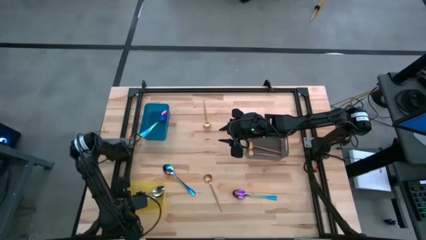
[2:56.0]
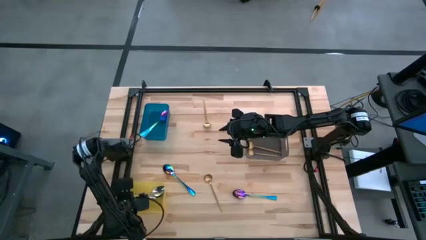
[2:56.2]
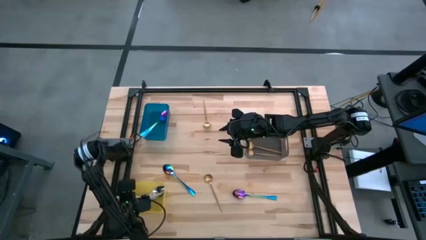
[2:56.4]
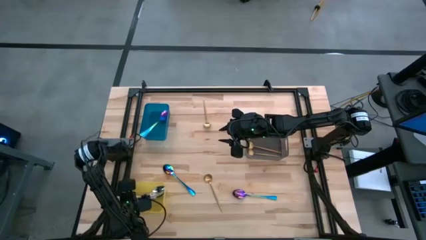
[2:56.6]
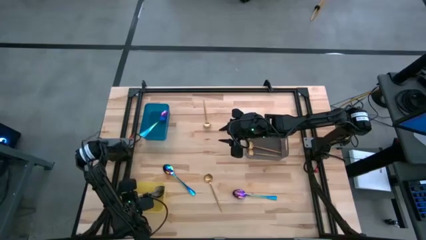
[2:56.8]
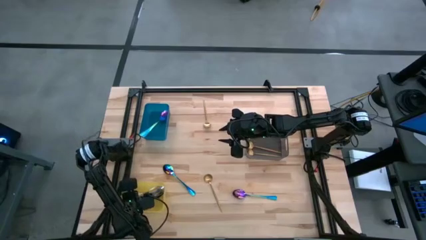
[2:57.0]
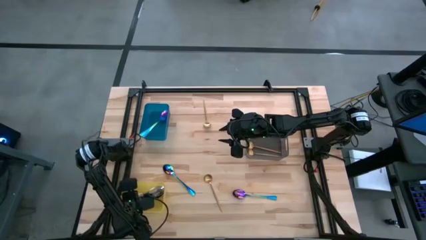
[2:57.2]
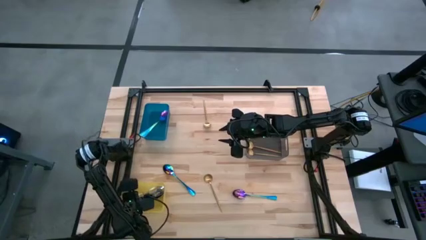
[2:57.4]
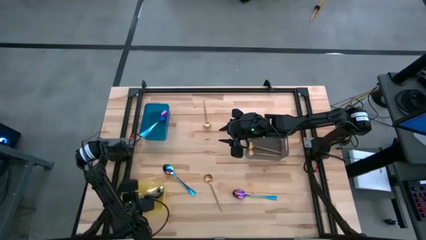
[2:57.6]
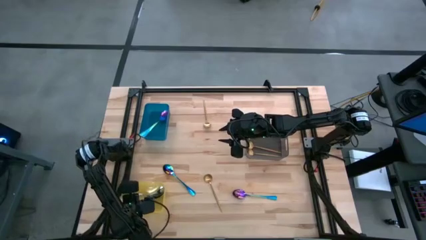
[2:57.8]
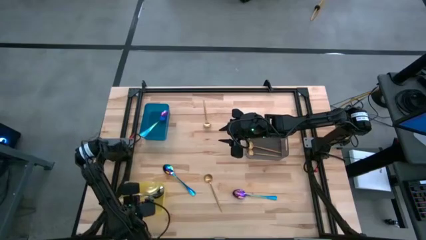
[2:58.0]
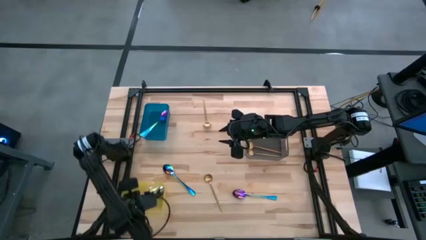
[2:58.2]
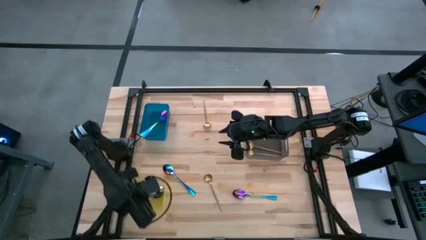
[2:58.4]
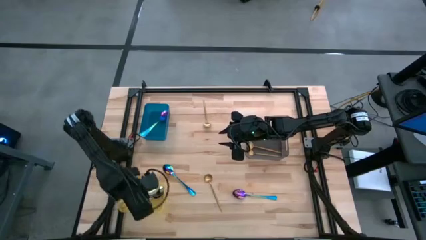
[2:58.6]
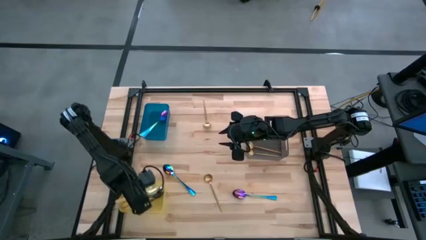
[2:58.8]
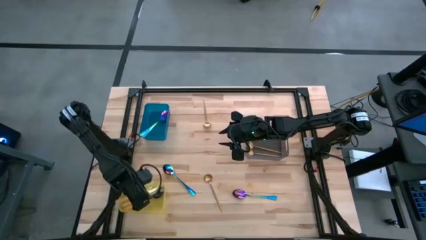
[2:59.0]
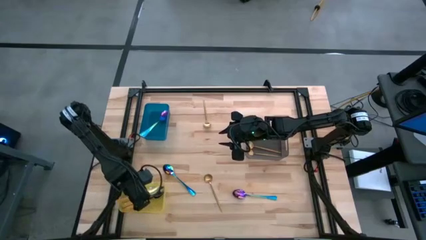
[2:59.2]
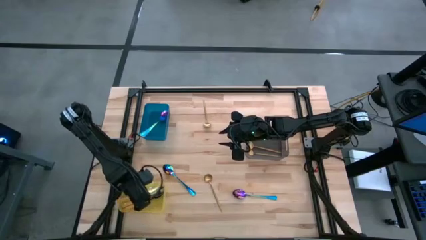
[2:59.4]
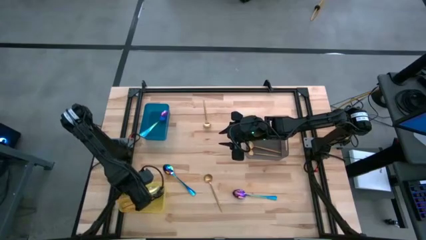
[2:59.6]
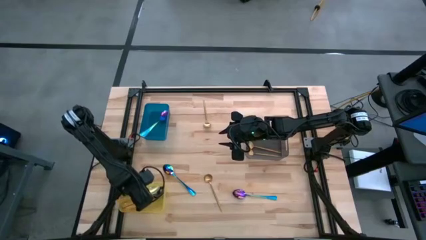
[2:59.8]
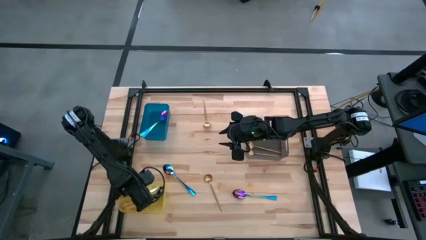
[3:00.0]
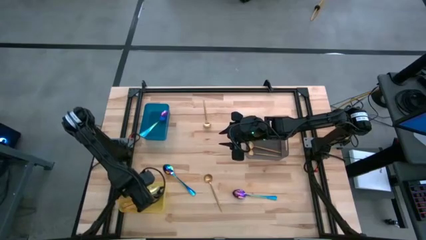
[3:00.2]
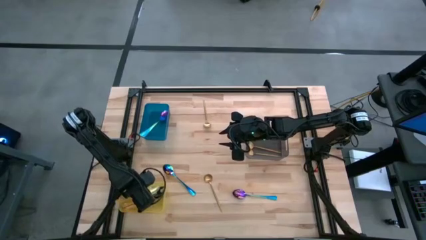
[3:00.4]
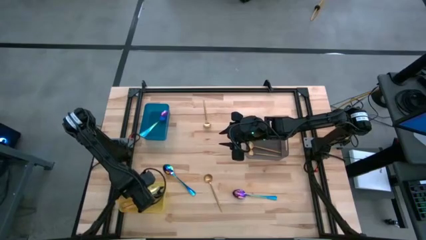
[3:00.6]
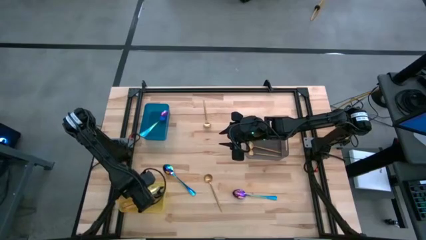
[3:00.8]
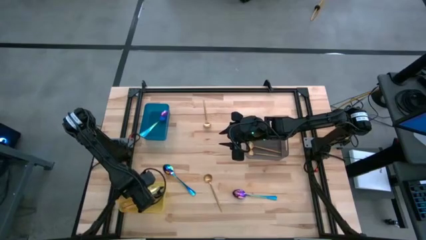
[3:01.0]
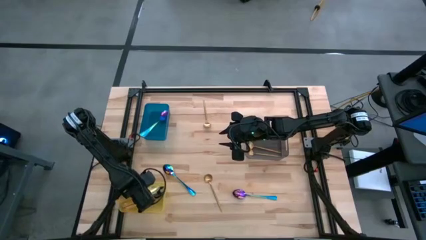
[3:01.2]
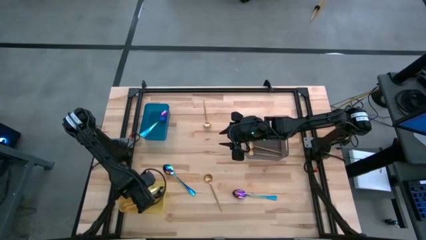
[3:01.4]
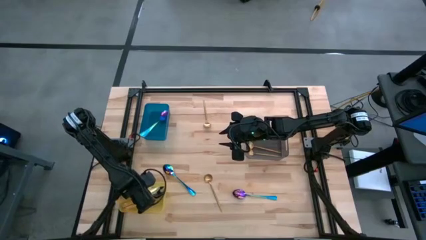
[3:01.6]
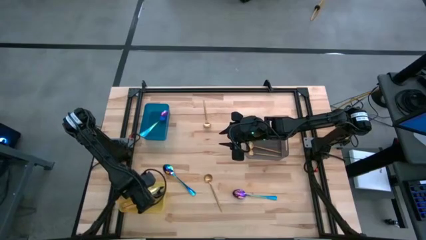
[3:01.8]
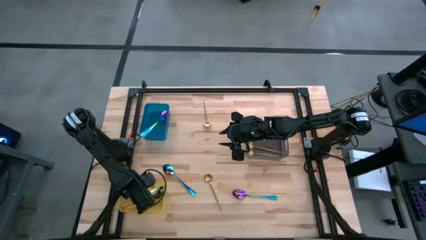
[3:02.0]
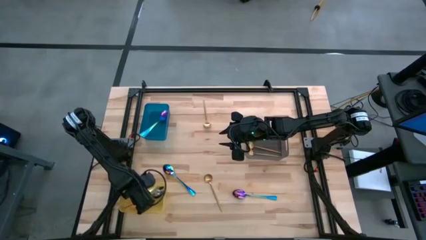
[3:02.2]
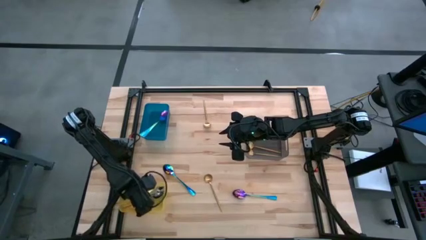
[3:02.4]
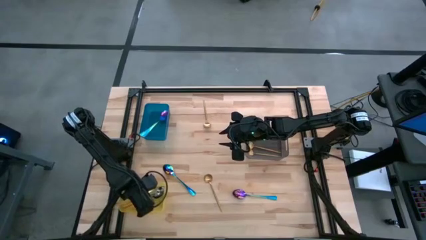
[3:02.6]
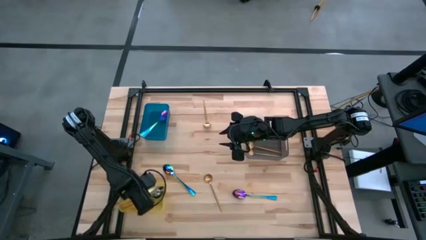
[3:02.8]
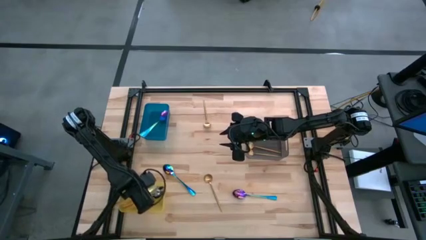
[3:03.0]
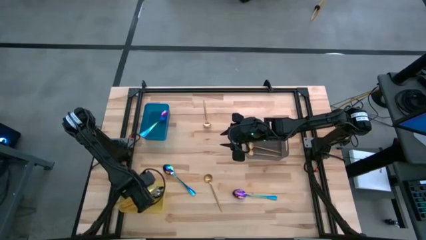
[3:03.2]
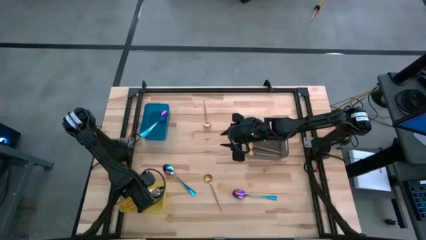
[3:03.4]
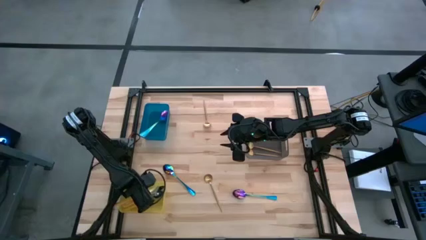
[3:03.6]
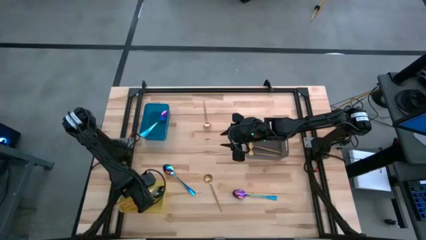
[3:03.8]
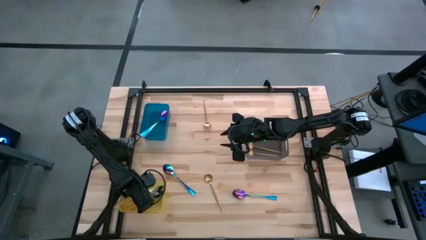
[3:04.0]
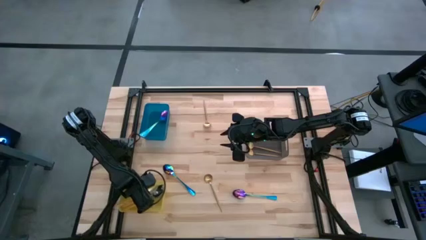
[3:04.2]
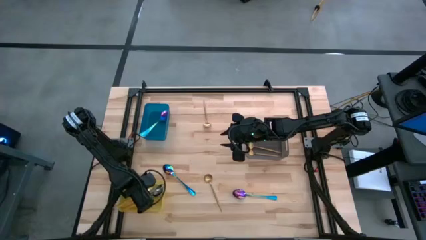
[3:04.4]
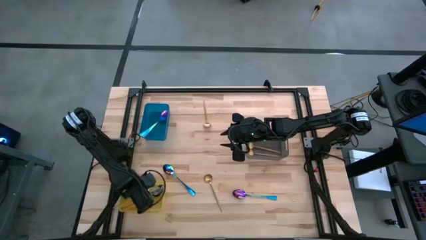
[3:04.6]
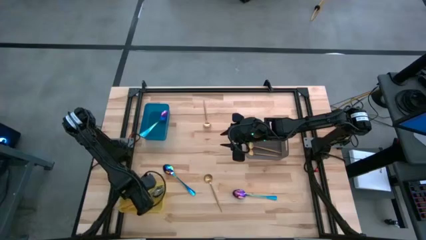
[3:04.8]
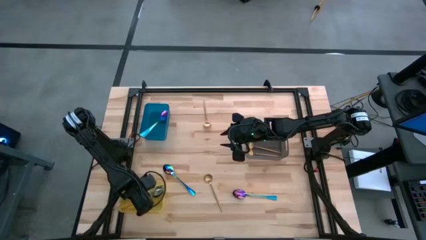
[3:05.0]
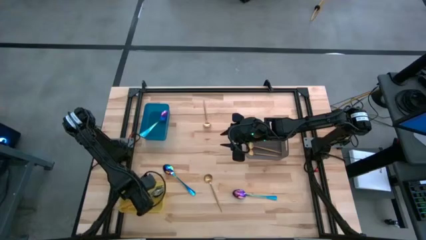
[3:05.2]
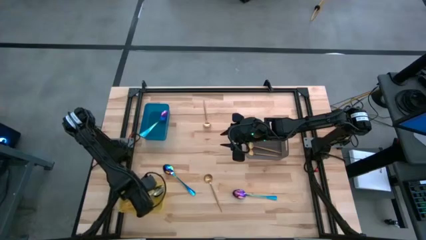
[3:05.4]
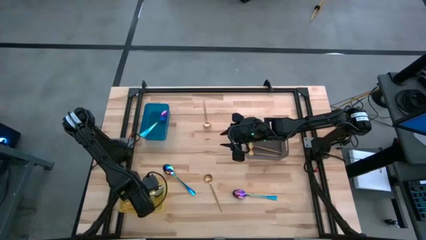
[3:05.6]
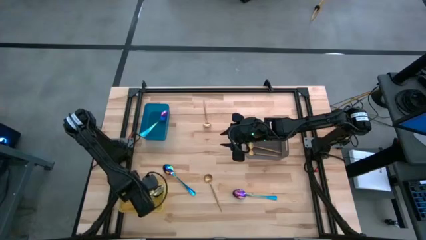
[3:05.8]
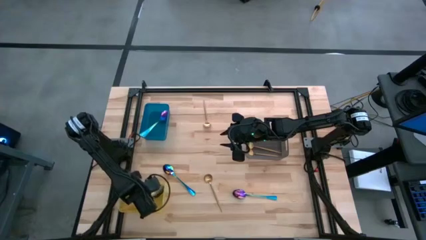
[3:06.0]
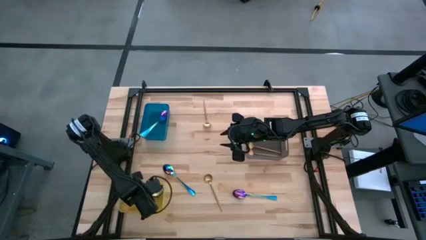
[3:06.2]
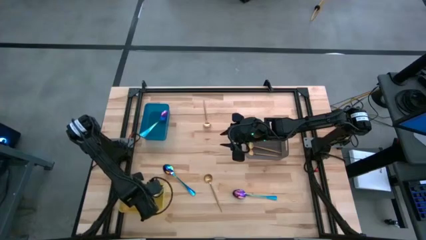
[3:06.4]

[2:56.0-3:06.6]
Task: Sort silverware by color (type)
Put the yellow spoon into the yellow bin

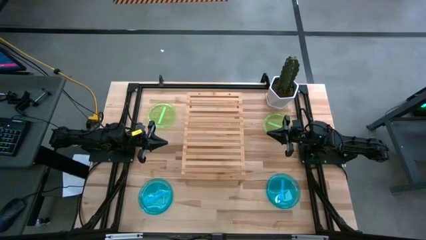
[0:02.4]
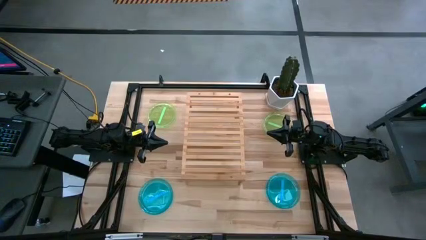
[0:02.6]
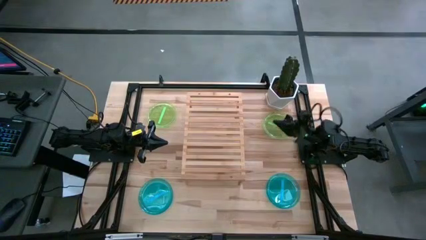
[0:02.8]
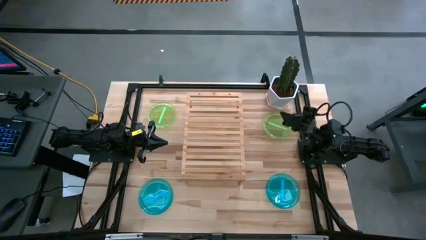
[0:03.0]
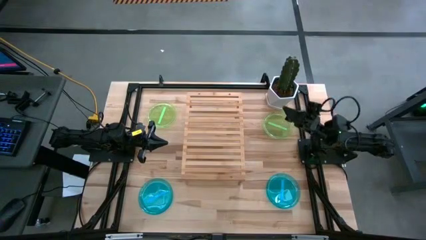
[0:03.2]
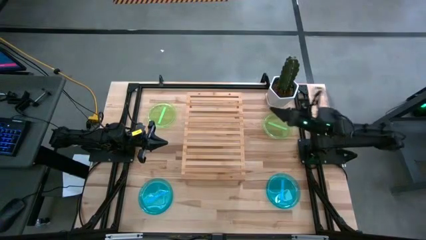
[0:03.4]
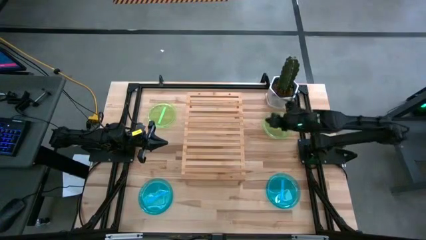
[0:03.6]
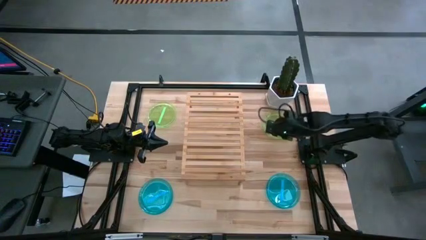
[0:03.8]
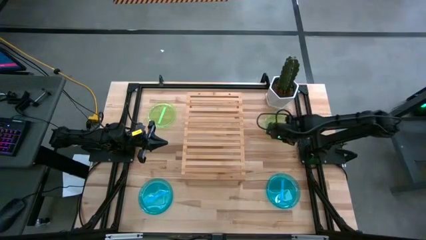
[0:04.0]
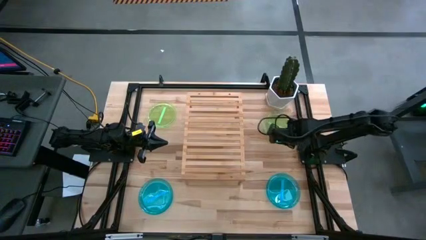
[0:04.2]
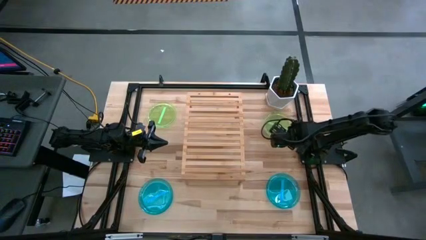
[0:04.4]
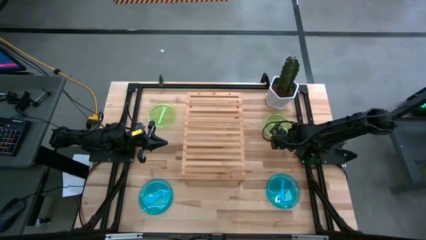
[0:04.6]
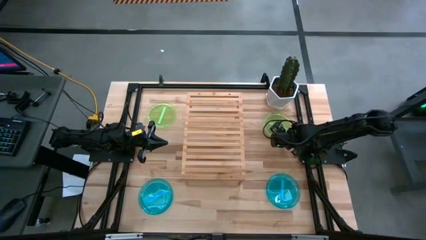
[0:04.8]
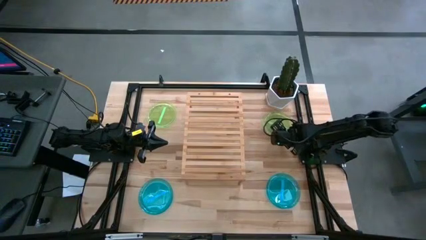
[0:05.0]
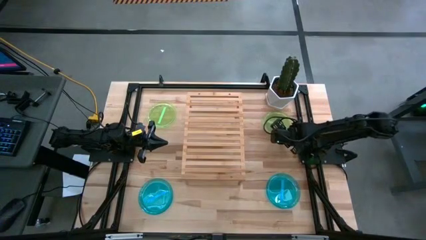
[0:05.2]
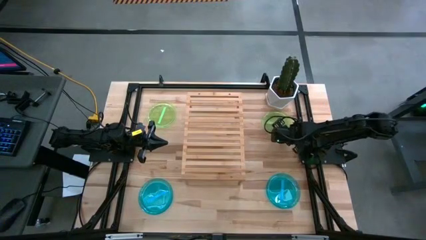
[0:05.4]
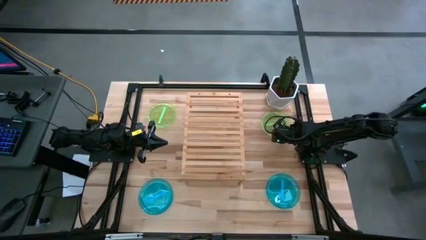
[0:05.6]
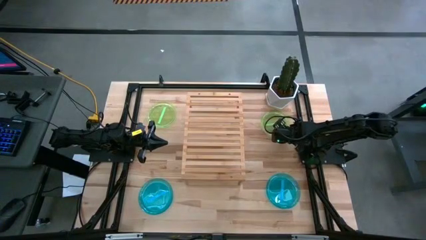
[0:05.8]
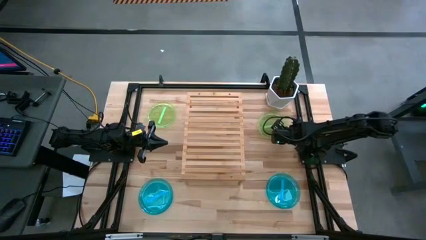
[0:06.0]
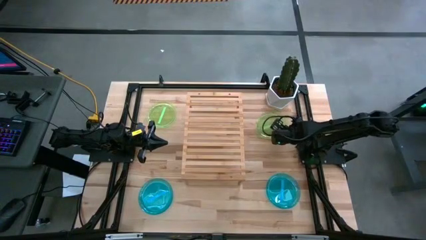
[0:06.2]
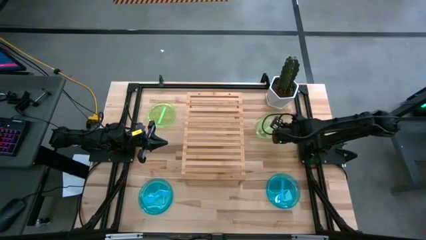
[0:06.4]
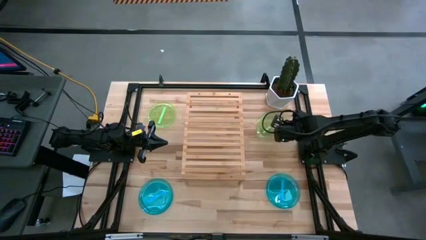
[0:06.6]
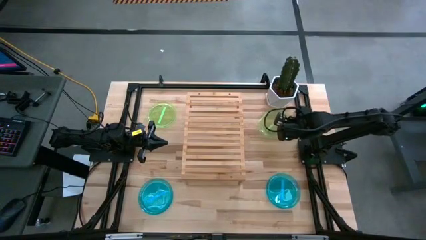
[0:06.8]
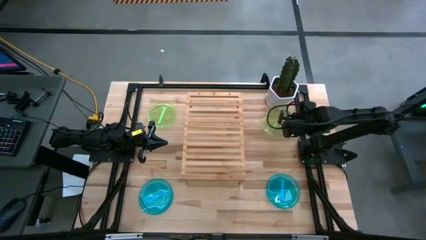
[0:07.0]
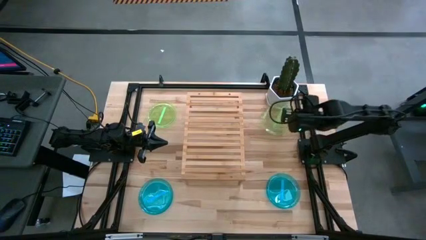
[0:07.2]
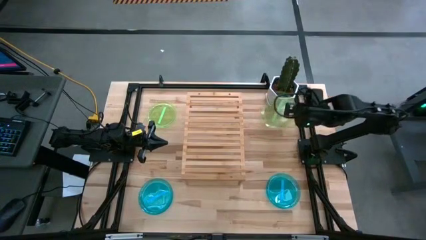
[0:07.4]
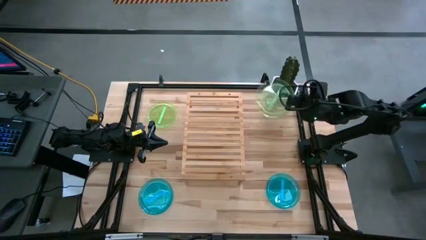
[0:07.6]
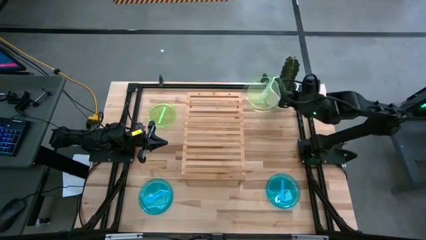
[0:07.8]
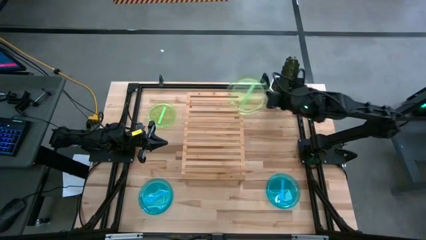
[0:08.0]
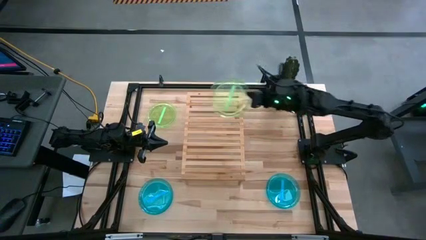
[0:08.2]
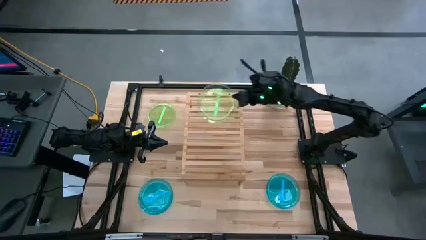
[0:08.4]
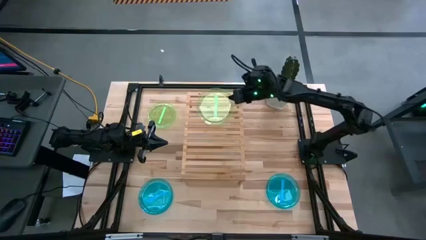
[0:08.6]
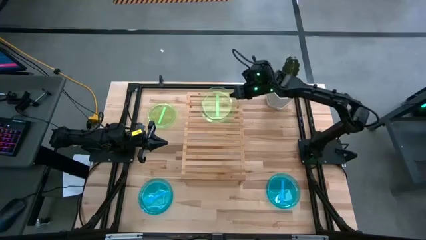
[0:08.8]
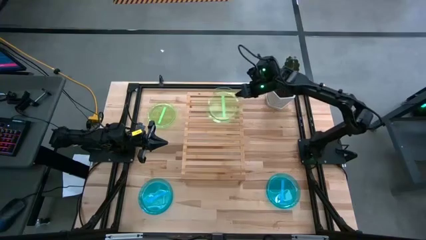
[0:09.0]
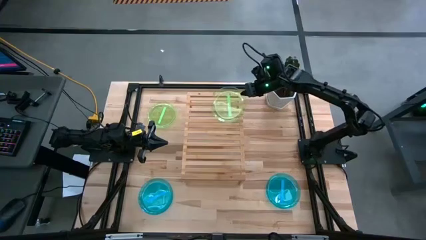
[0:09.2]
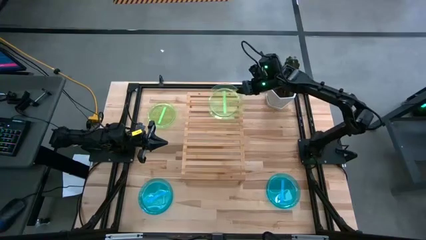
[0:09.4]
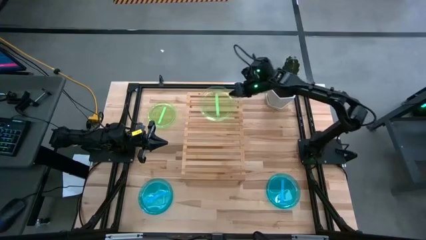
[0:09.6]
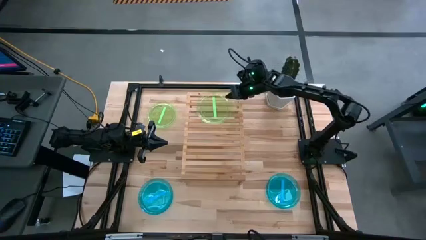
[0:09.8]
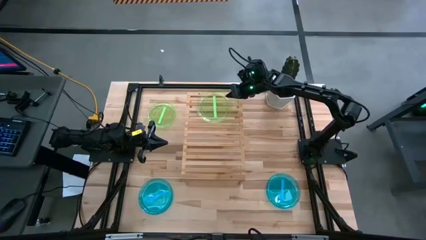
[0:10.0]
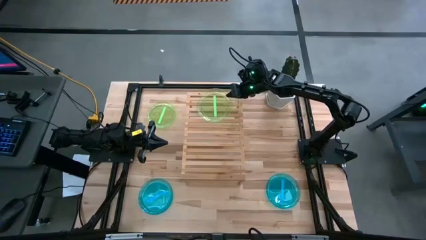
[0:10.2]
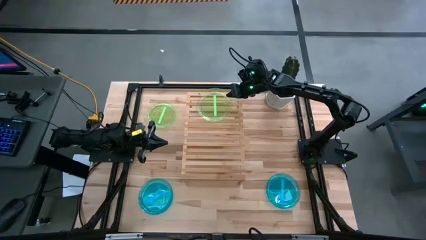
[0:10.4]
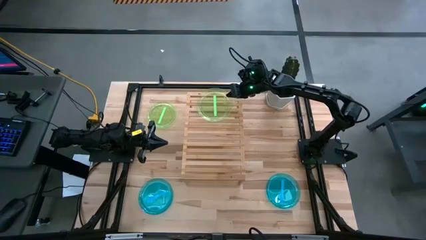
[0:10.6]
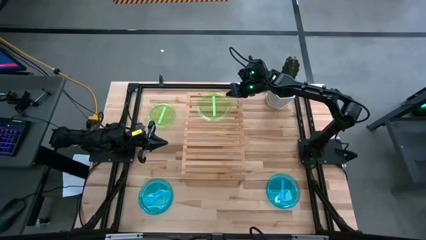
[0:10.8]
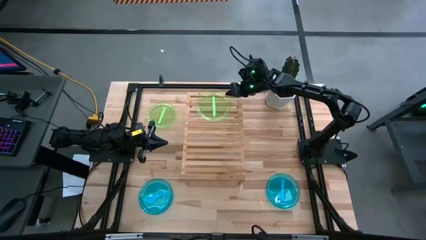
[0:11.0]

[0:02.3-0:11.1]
Task: Place and stack plates onto a shelf
Put the right green plate on the shelf
